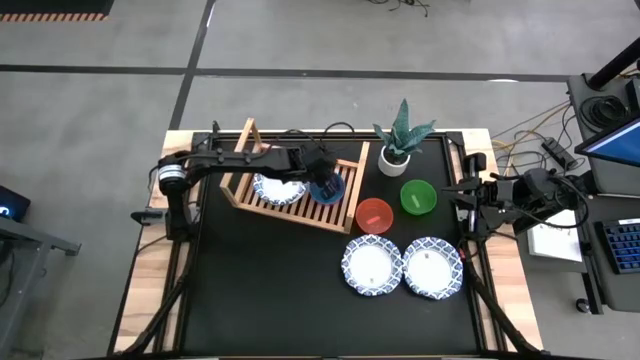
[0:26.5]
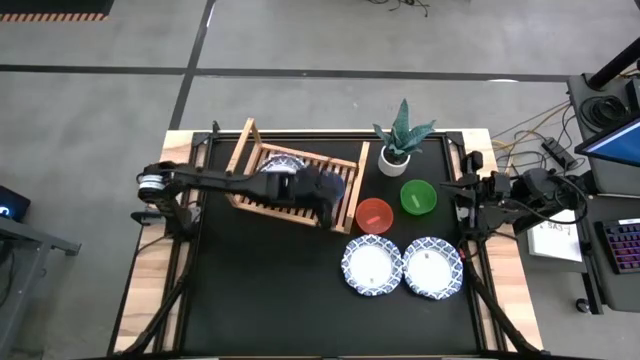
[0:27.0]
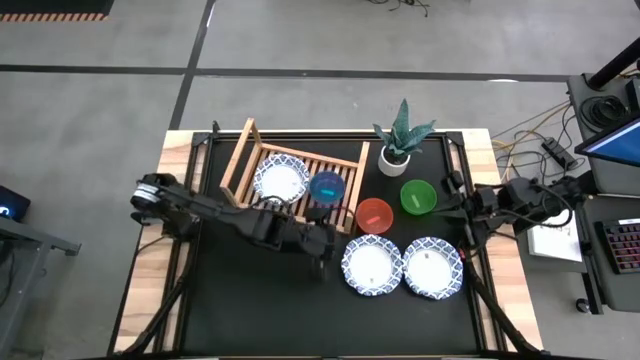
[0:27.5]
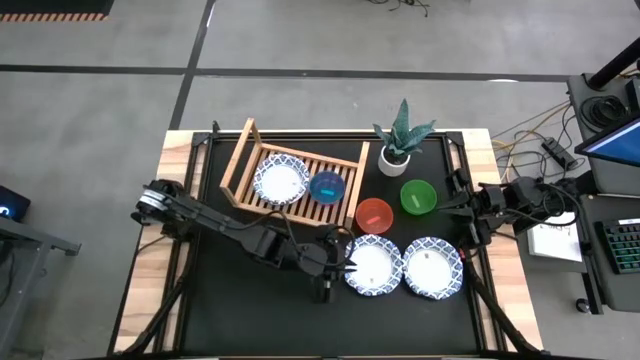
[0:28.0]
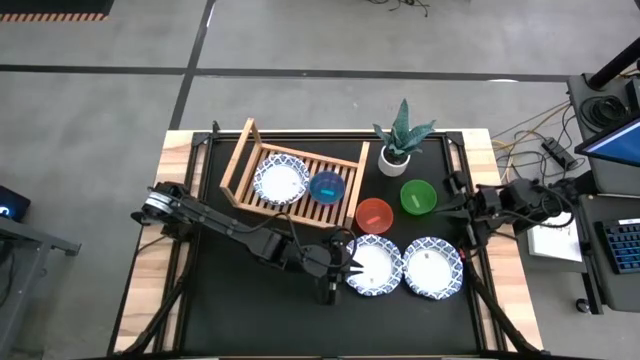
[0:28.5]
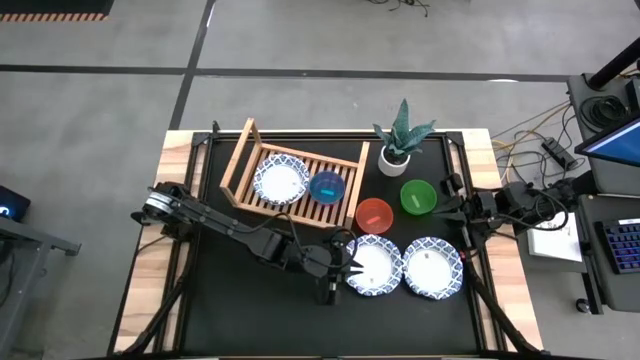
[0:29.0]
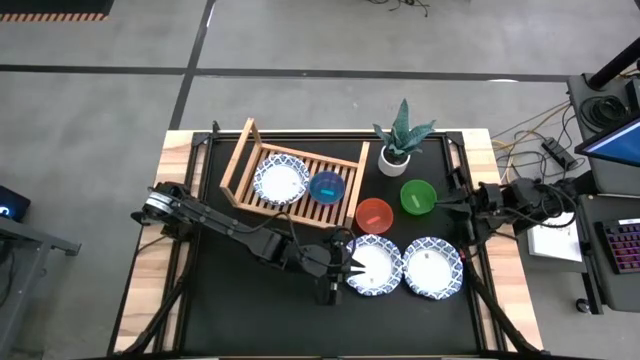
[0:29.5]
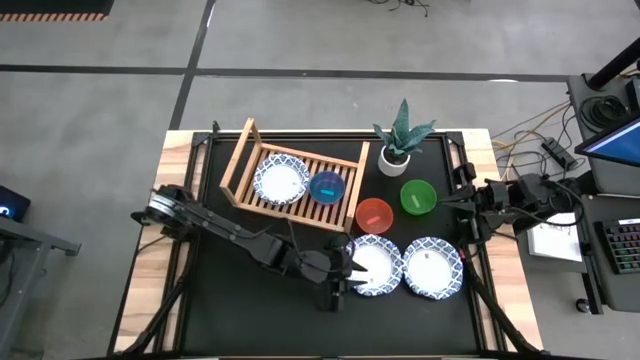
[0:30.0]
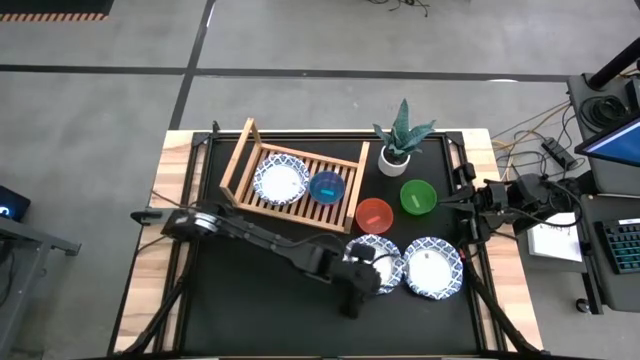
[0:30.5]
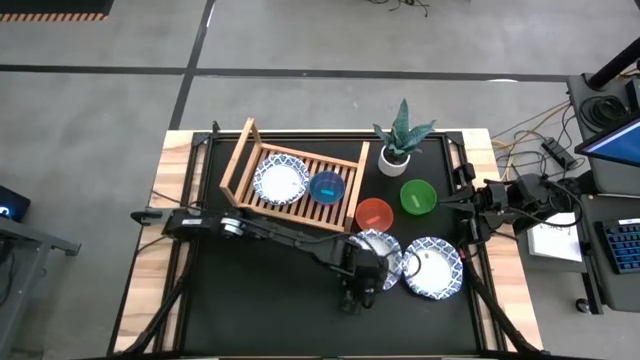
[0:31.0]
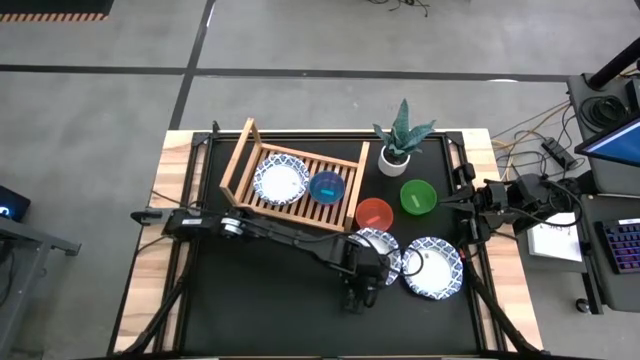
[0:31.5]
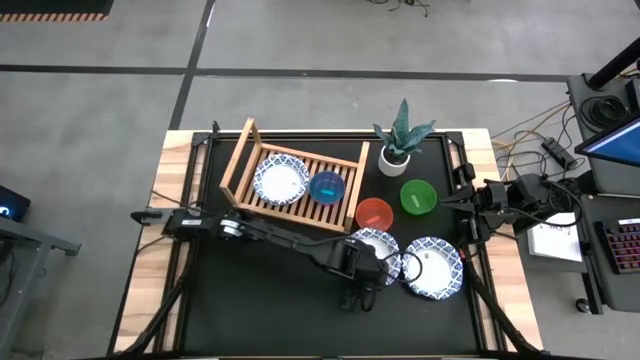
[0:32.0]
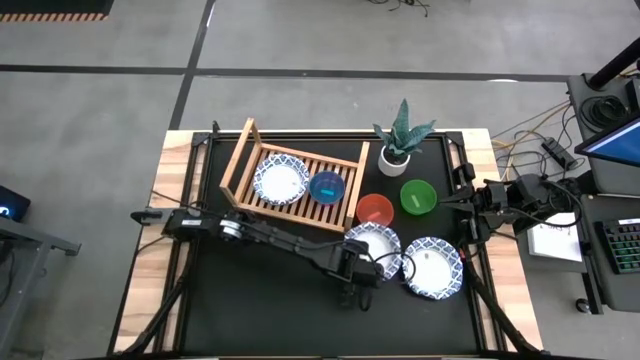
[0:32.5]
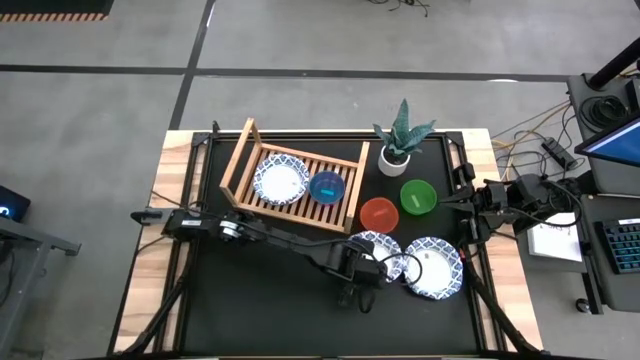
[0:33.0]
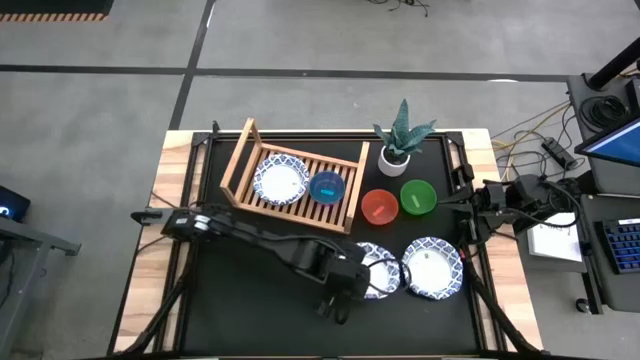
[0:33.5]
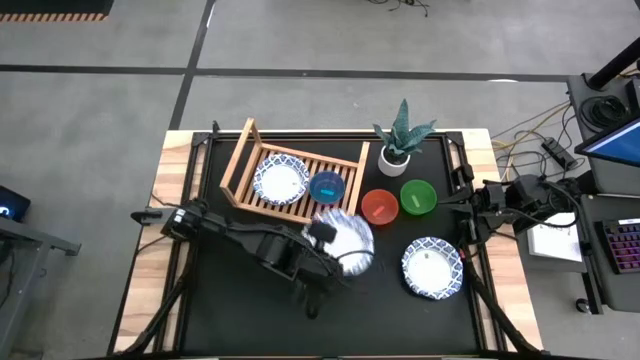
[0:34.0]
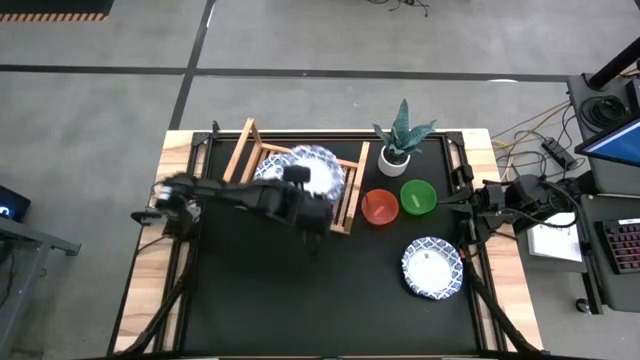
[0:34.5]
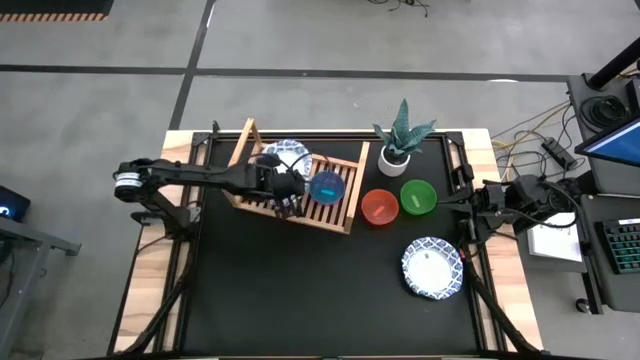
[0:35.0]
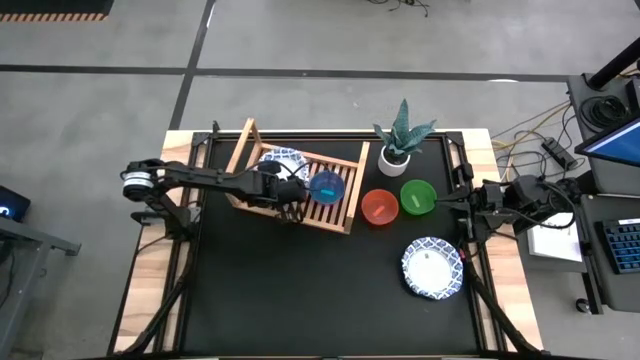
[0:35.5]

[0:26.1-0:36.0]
Task: Place and stack bowls onto a shelf
Stack the white patterned bowl on the white patterned bowl on the shelf

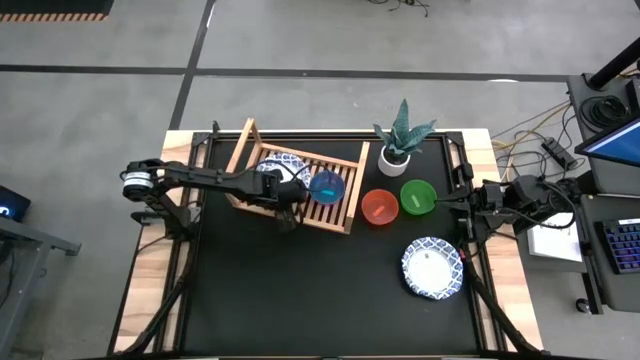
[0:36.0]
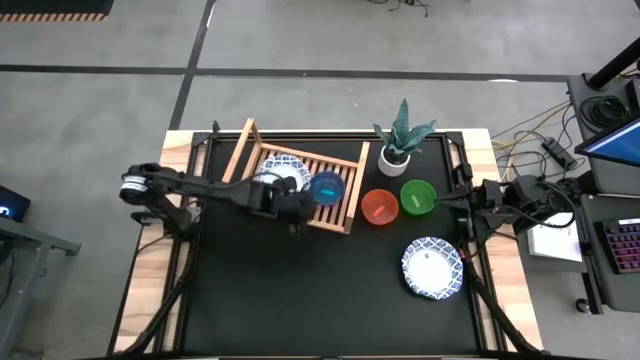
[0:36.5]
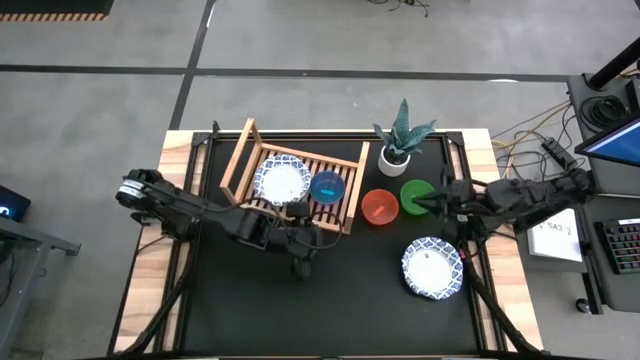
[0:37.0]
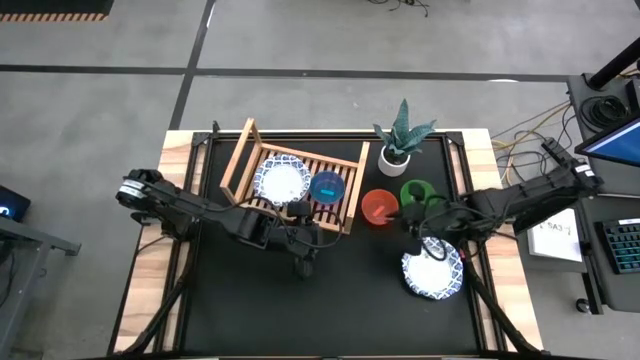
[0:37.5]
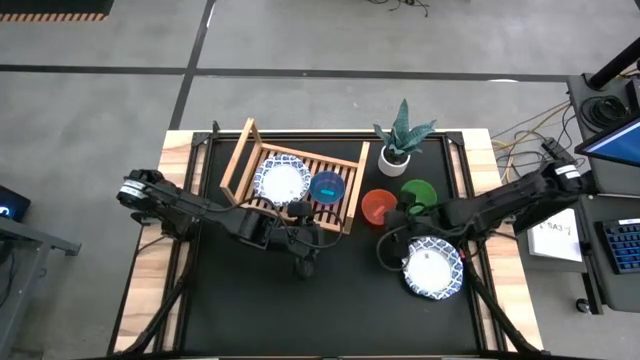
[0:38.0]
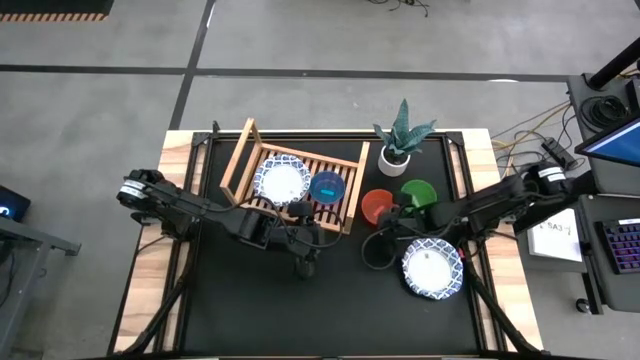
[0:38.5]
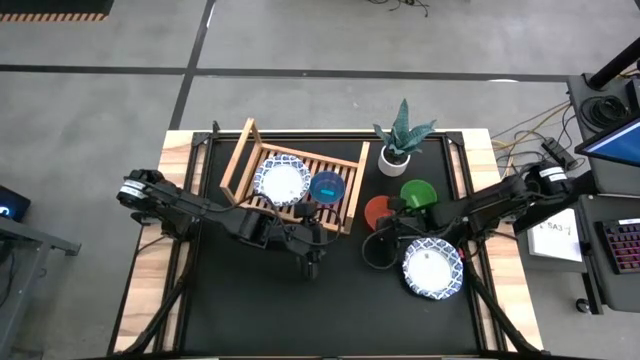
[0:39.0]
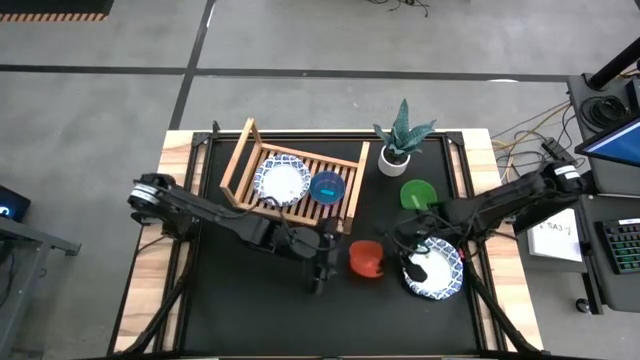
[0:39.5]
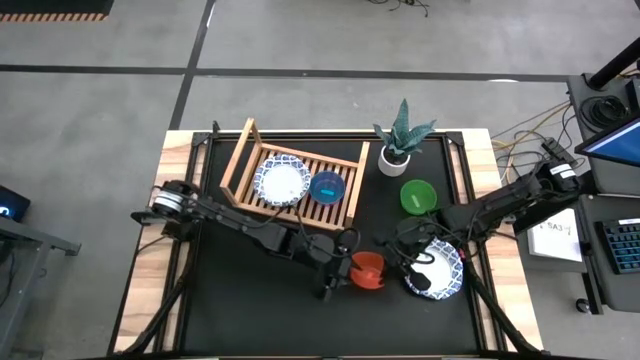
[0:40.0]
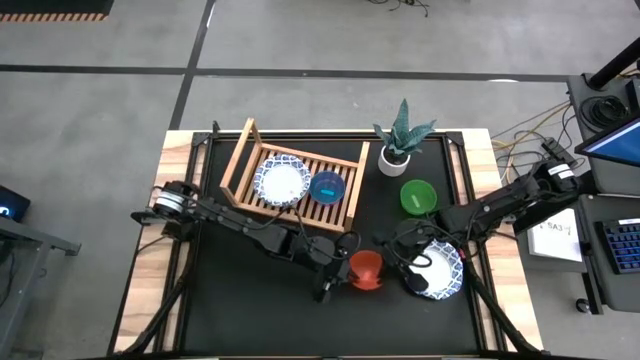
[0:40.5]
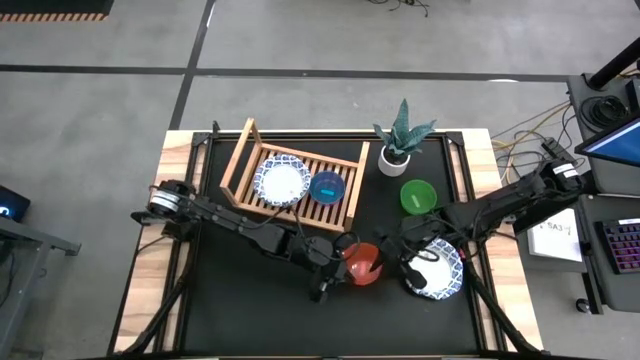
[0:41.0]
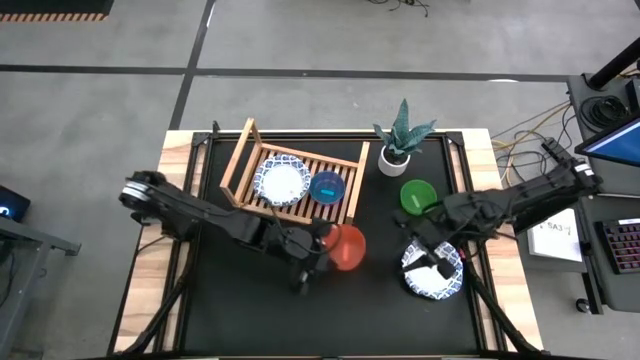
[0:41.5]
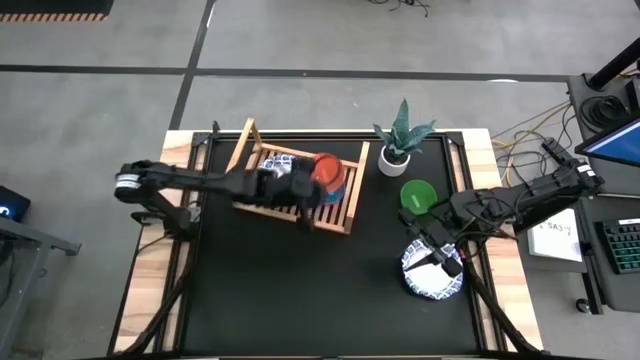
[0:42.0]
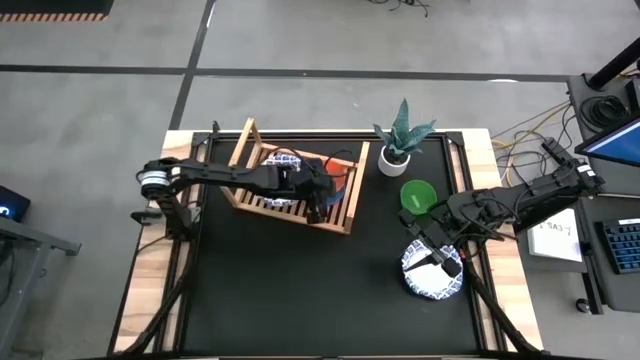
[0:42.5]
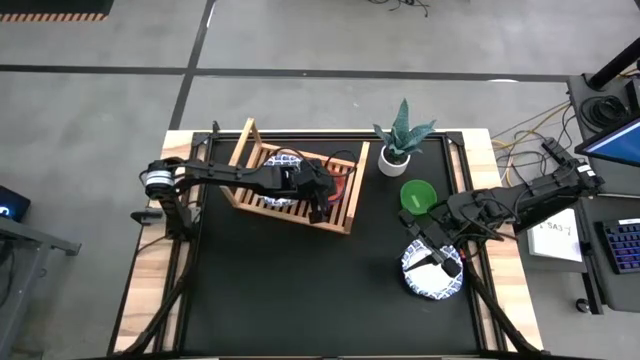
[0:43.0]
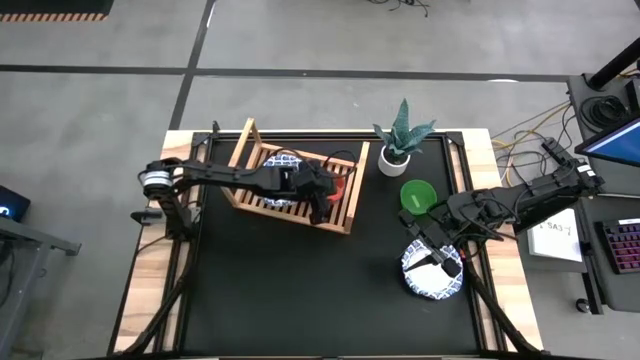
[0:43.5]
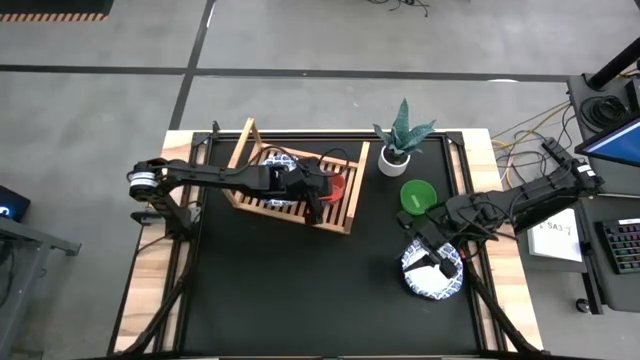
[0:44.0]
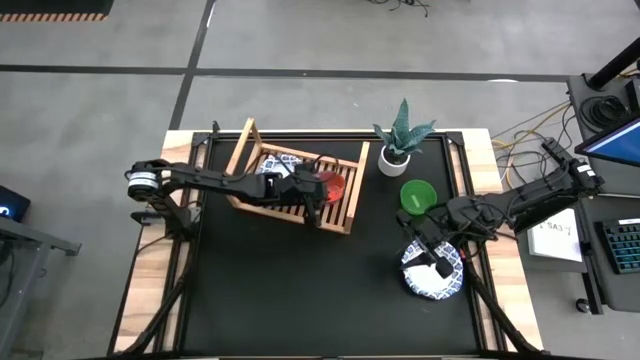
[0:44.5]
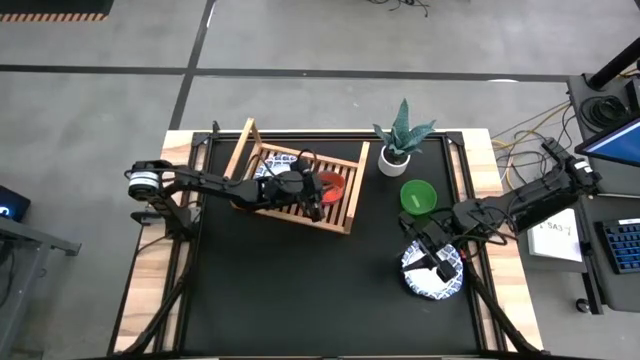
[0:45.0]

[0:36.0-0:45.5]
Stack the orange bowl on the blue bowl on the shelf

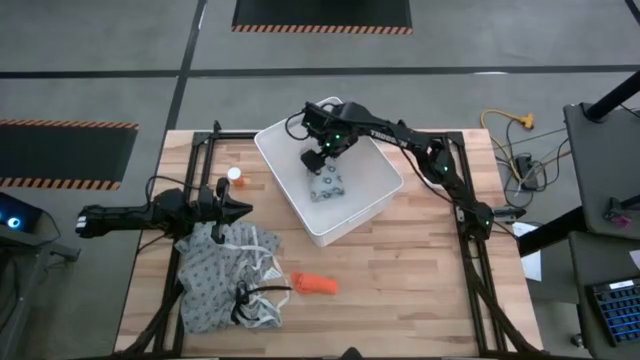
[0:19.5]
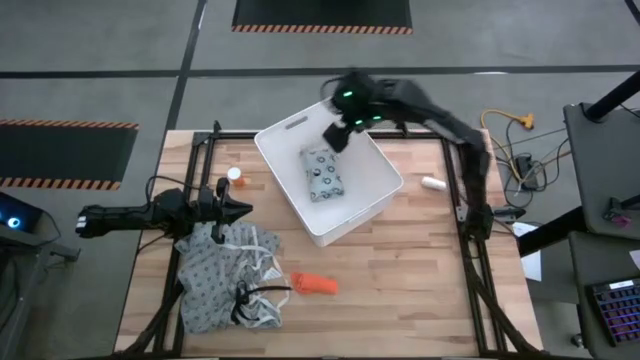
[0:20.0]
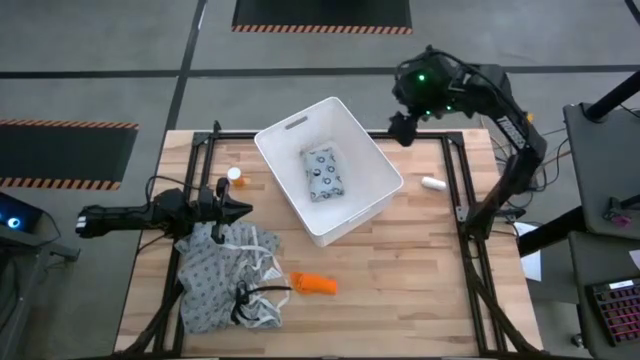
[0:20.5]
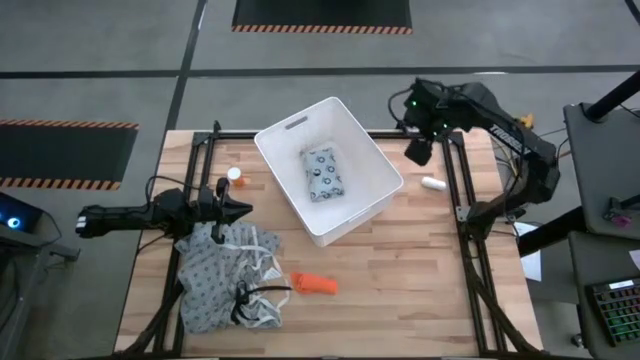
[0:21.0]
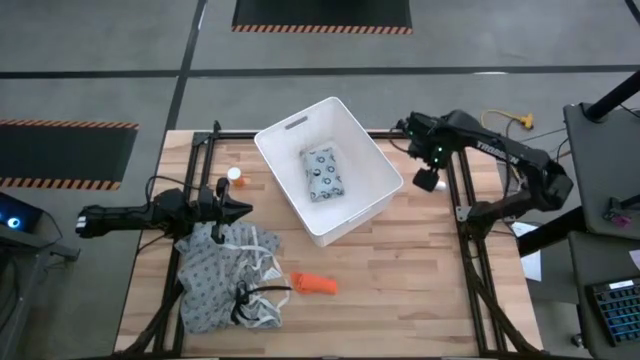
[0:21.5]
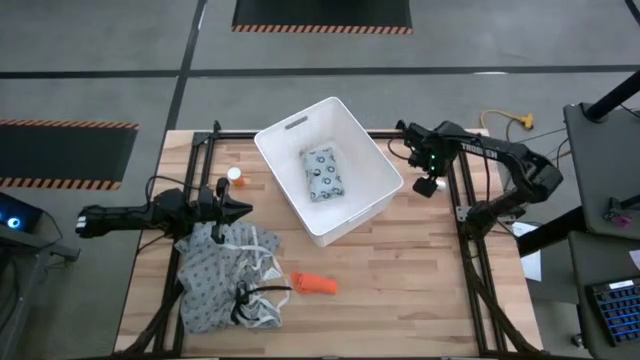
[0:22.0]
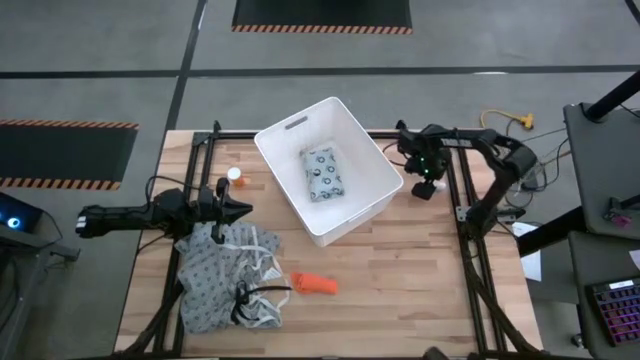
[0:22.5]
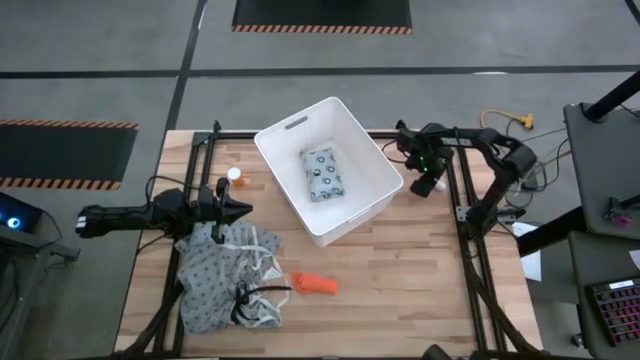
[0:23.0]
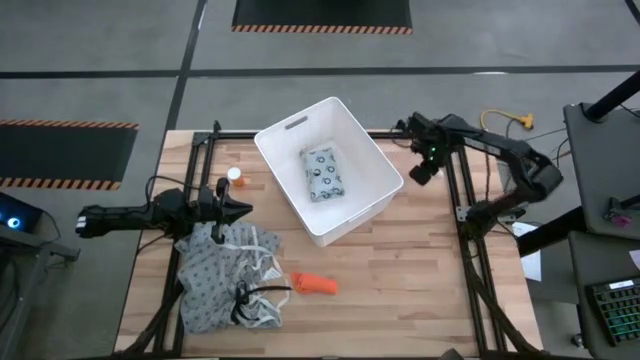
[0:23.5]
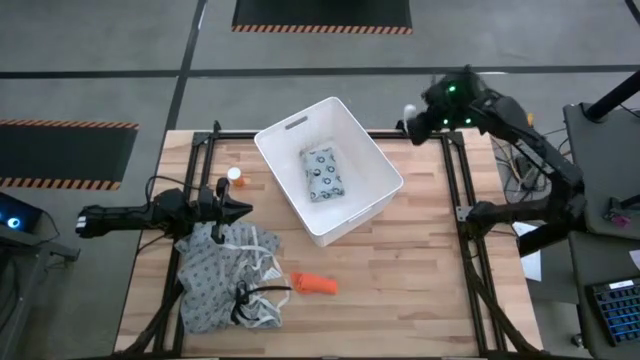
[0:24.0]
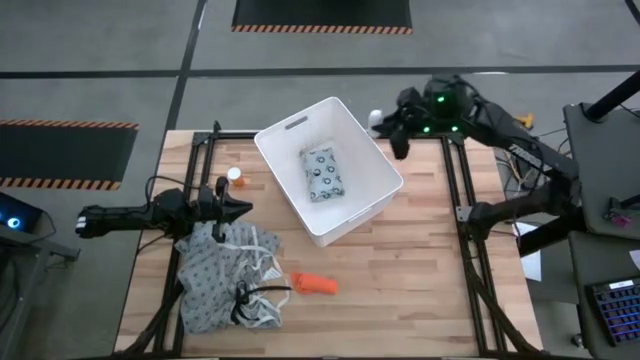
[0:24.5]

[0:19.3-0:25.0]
Task: Pick & place medical supplies in basket/bin
Put the white gauze into the white bin
